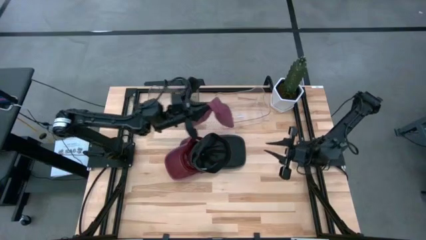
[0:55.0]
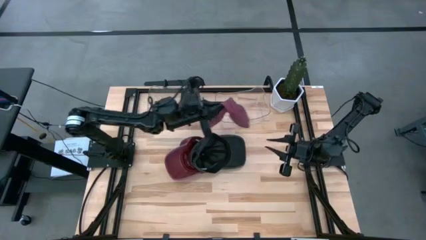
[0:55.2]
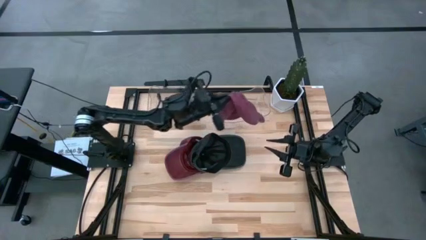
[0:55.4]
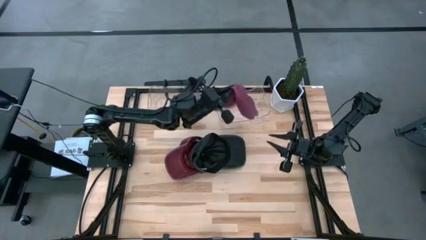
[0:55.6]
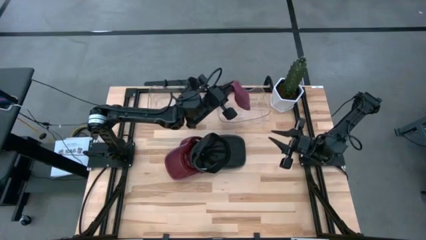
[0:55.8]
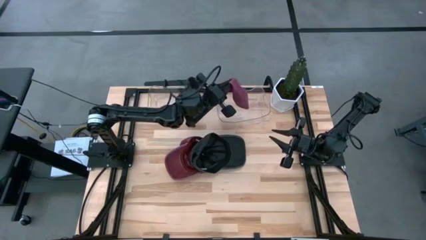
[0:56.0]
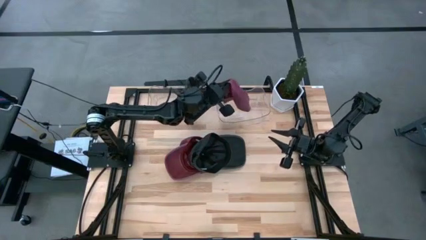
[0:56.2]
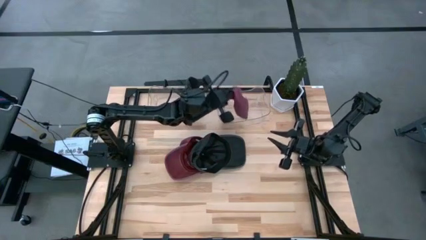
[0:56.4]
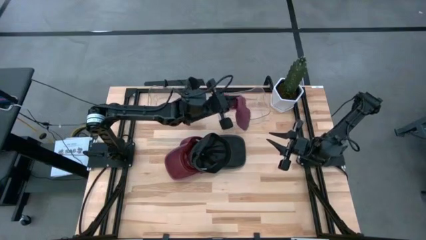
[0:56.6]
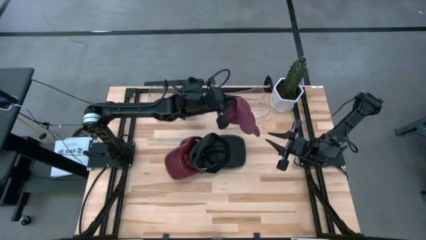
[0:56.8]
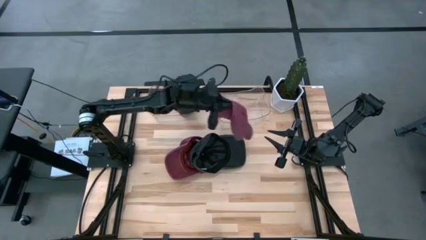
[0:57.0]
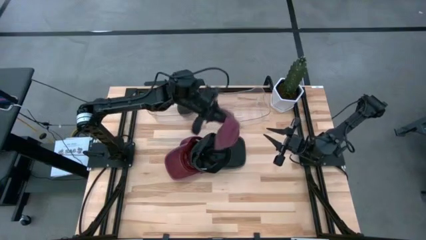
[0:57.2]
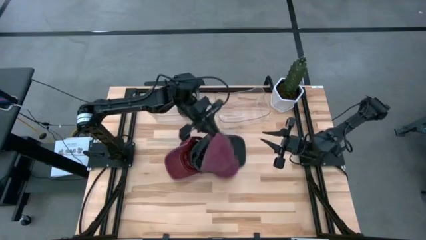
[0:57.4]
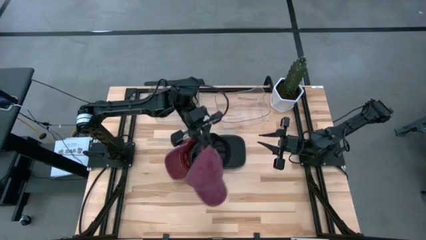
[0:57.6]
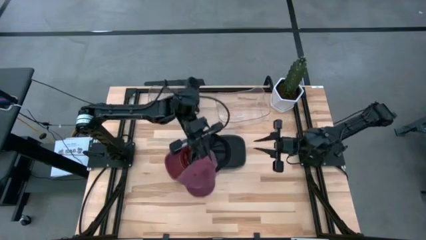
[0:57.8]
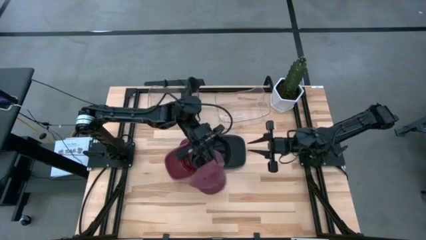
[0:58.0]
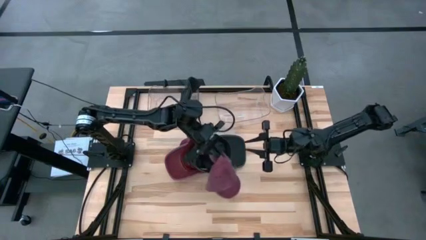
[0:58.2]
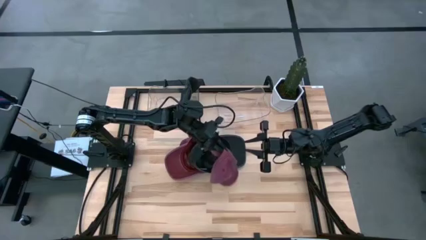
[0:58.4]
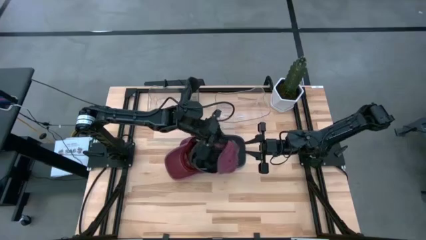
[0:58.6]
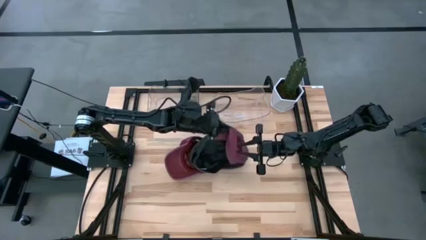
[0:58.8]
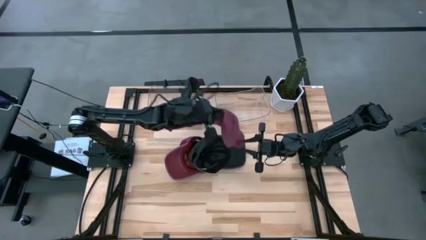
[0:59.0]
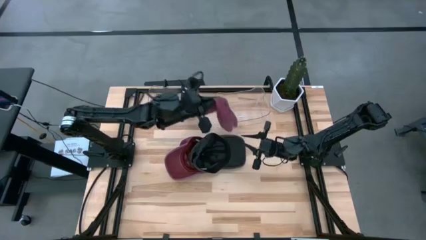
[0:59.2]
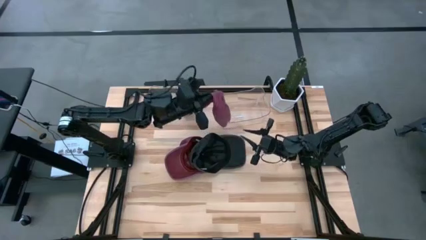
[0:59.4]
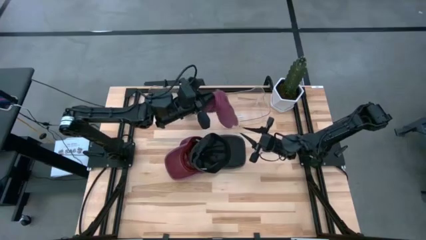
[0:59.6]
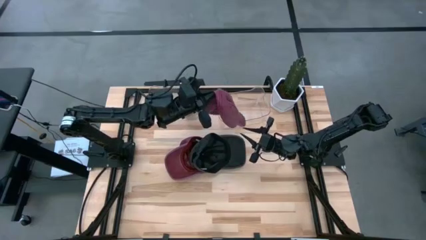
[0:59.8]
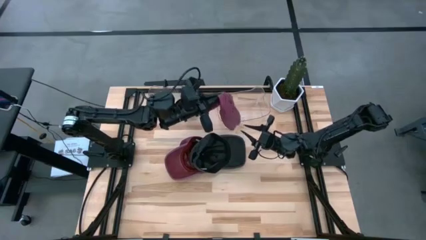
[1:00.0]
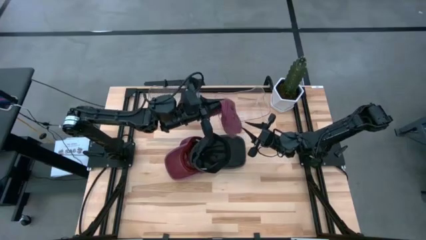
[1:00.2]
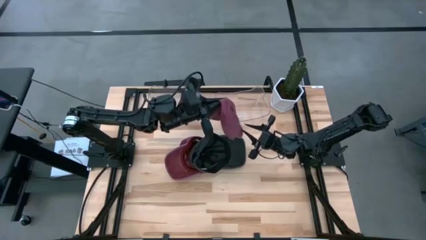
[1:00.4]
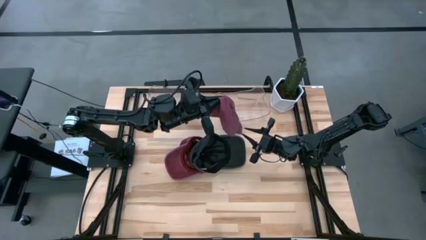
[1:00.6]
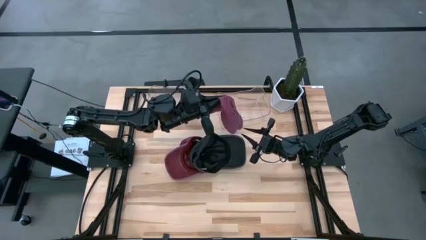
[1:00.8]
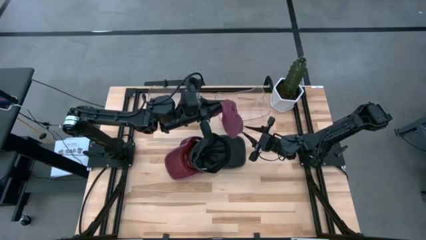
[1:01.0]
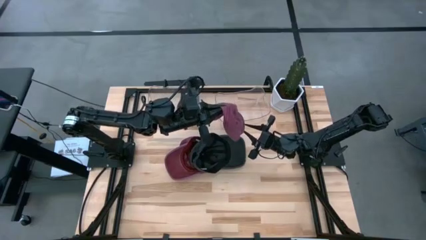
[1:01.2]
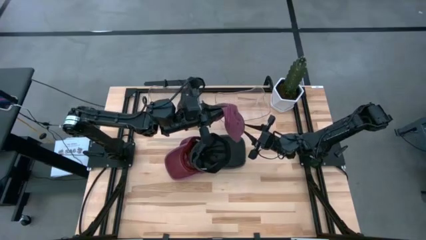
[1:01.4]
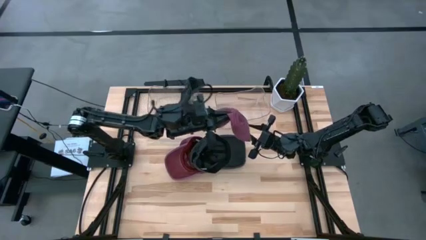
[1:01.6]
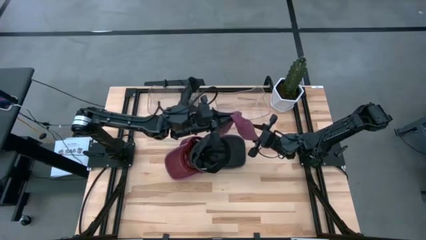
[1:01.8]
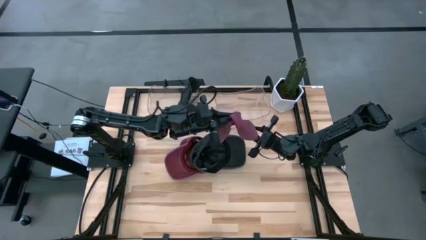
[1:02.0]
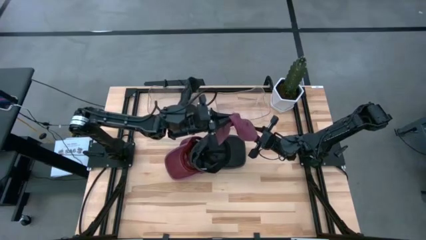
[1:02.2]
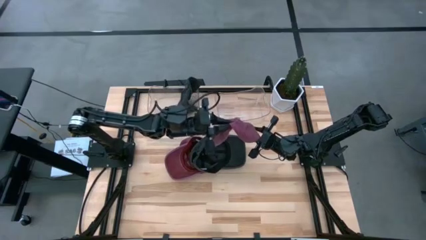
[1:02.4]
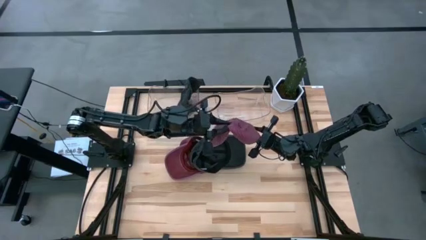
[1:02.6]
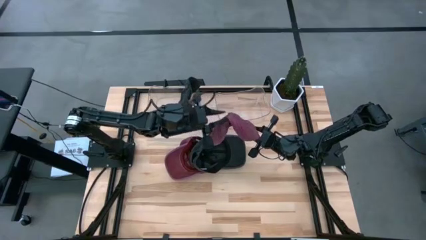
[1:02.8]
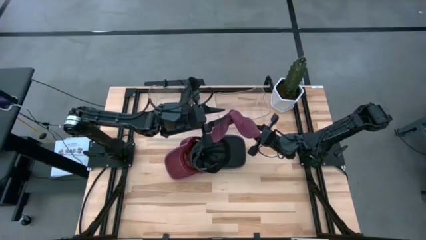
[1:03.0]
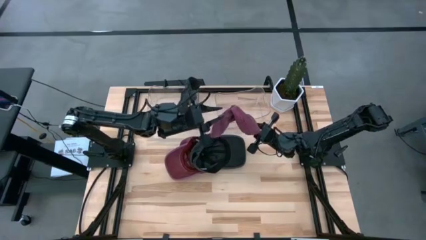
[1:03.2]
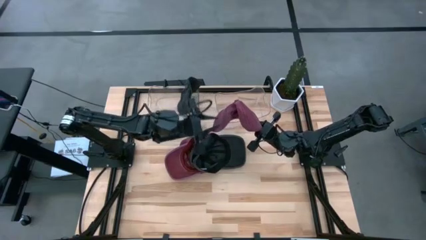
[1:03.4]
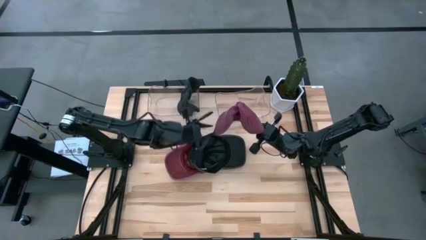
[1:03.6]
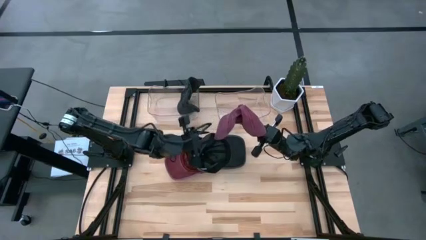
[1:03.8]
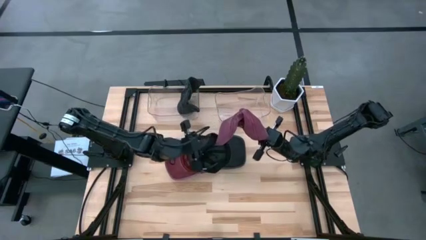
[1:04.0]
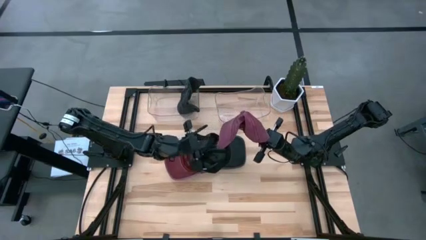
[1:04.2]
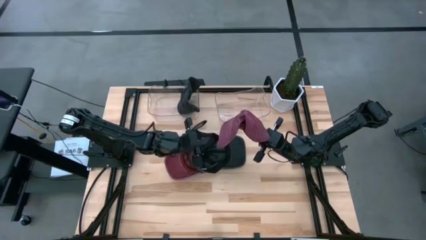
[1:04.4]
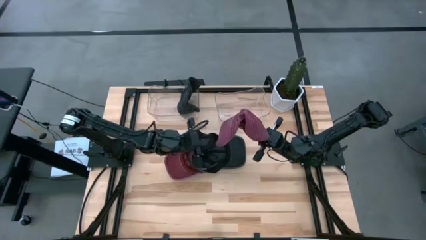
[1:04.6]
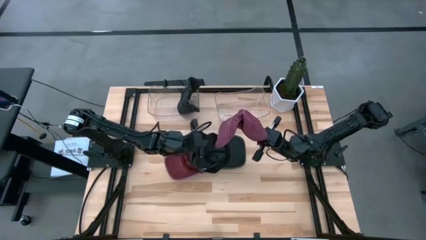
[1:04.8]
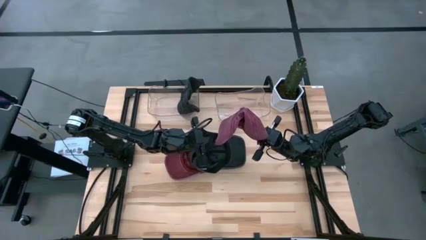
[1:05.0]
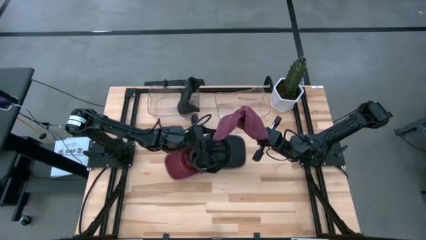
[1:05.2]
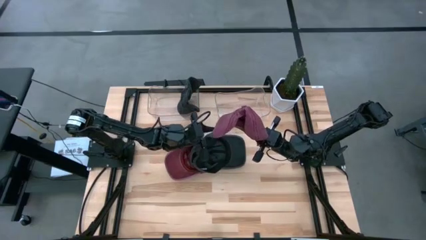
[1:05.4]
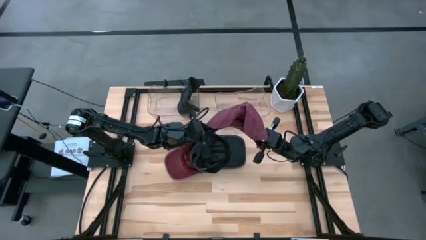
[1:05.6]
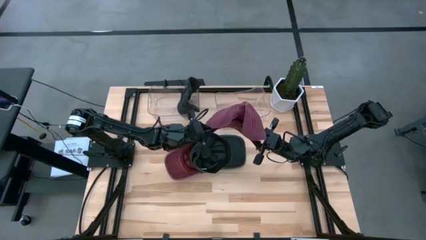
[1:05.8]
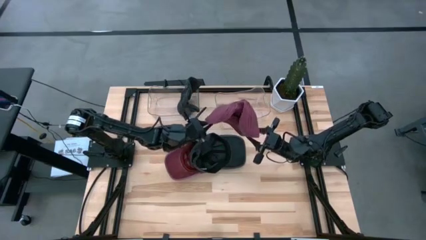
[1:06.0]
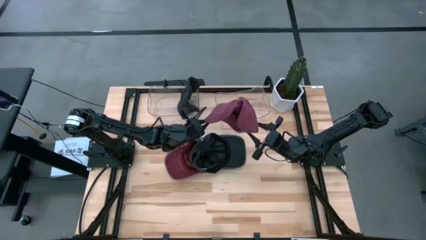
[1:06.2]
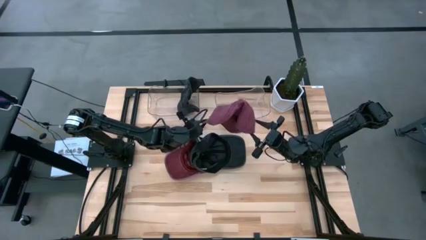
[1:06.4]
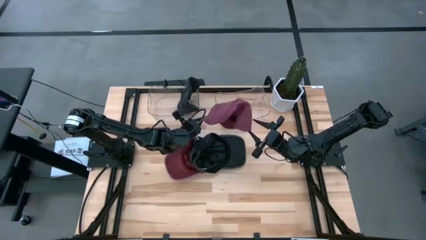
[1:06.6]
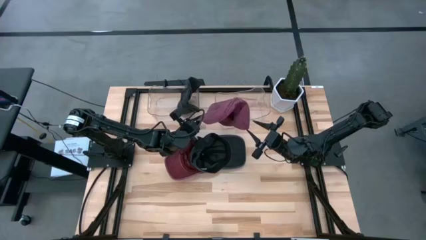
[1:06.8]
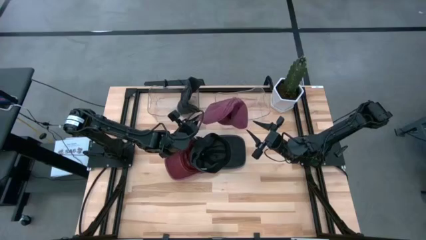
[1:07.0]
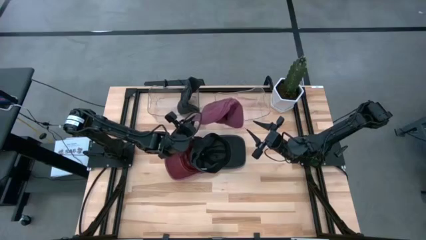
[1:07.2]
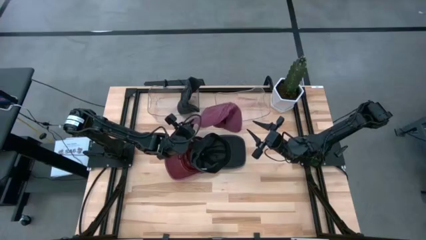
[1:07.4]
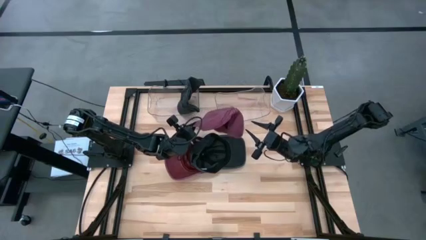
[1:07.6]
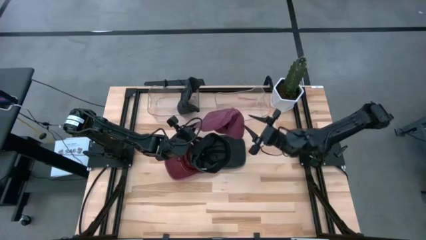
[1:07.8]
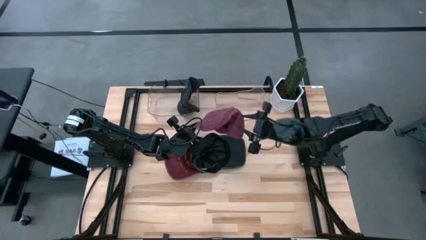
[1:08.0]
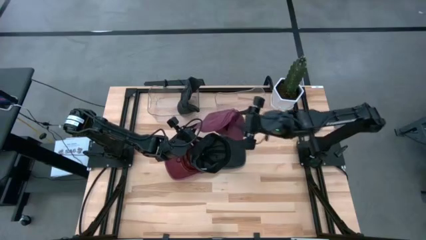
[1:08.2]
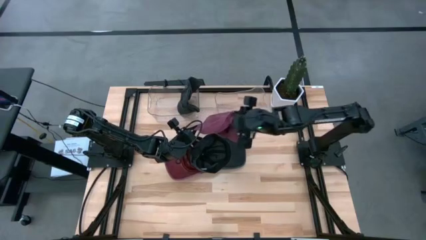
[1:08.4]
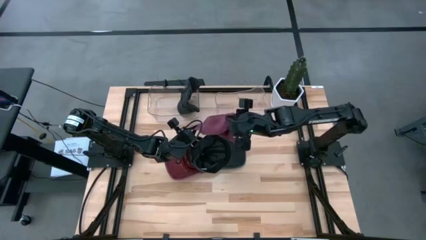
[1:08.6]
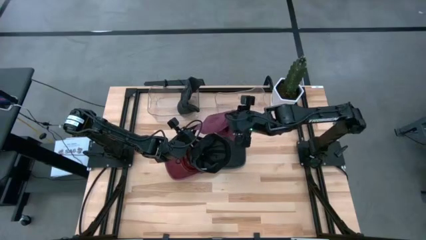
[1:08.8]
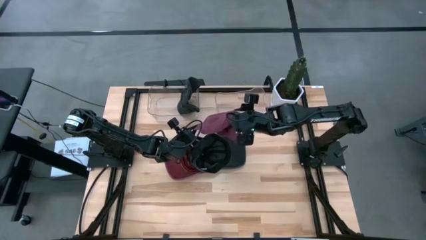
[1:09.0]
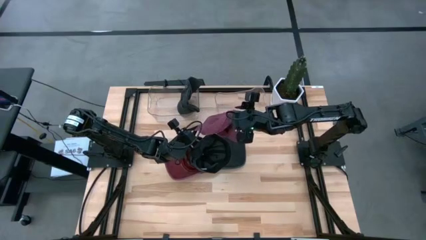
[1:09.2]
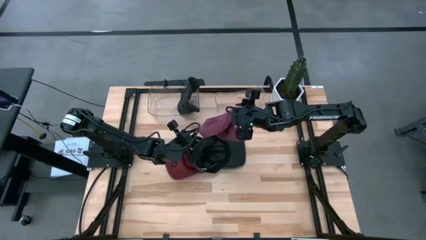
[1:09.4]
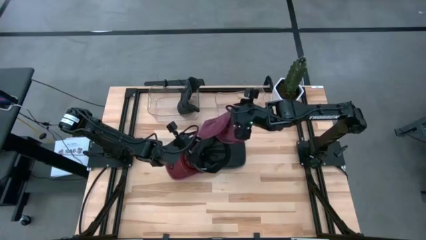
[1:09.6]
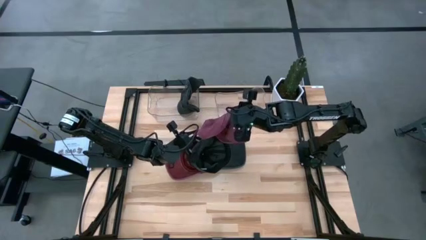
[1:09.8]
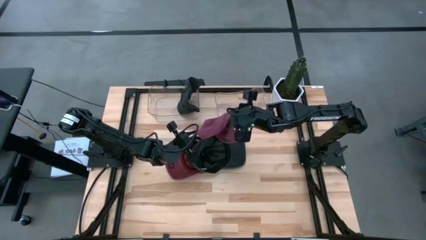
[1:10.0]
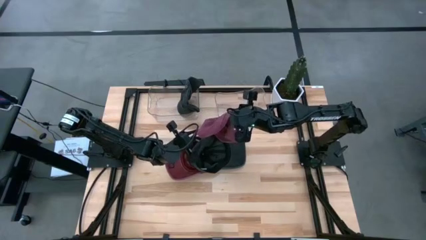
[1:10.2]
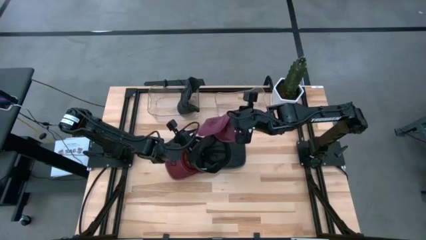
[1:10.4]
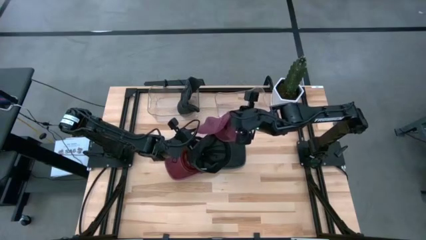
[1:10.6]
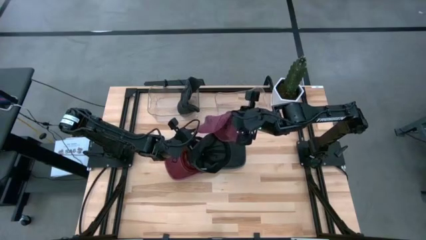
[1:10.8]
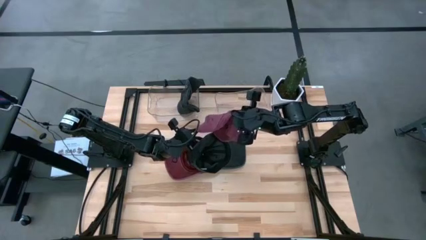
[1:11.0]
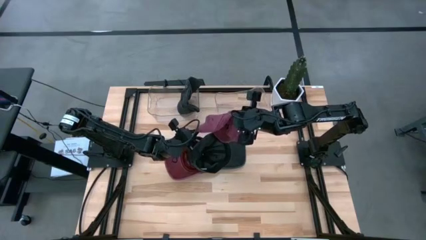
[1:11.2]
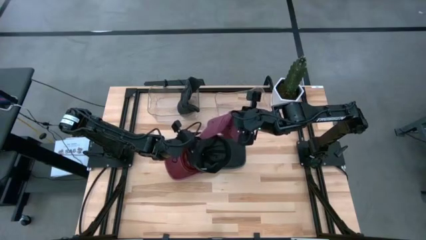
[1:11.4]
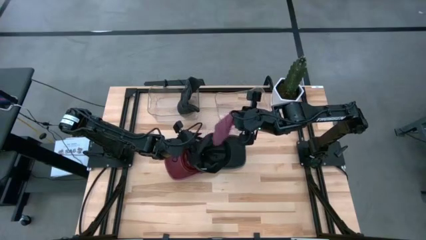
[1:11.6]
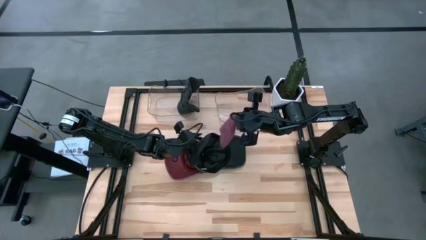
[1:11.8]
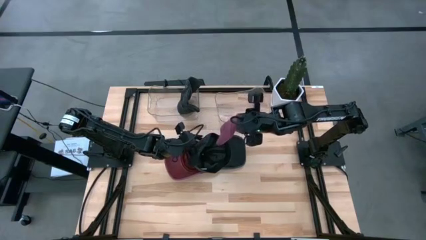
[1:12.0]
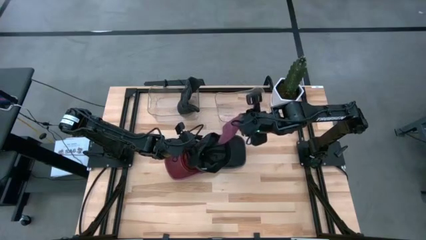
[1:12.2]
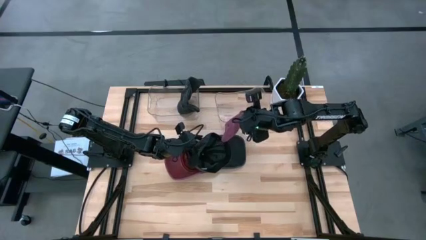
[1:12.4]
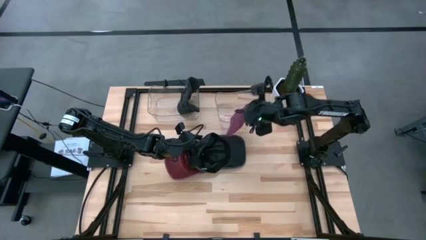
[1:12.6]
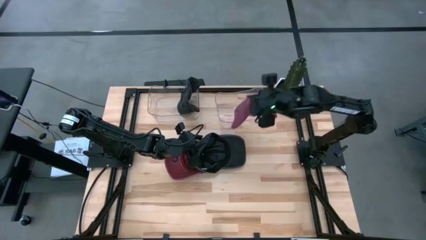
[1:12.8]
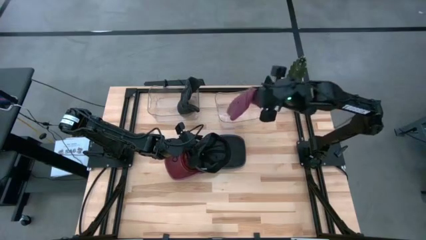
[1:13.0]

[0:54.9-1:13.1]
Task: Pick & Place hat
Put the red cap into the right transparent bin
